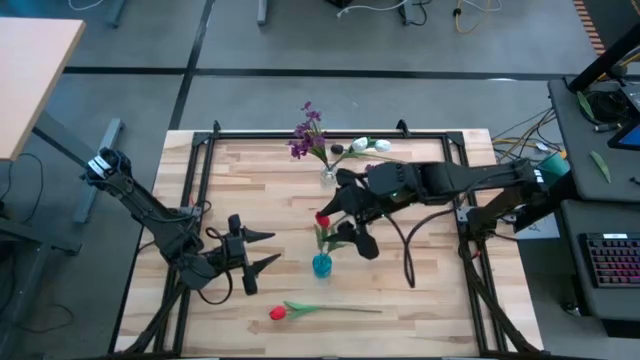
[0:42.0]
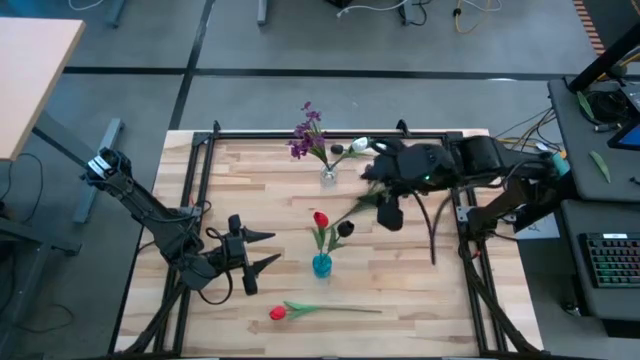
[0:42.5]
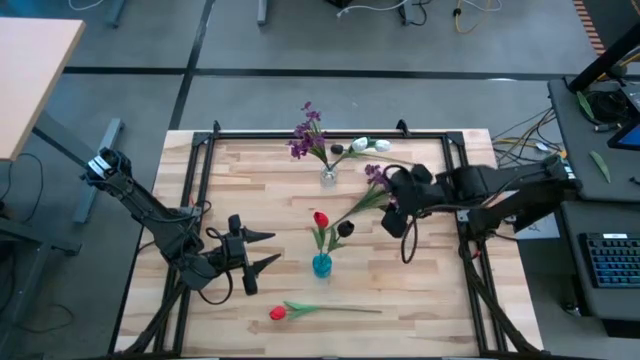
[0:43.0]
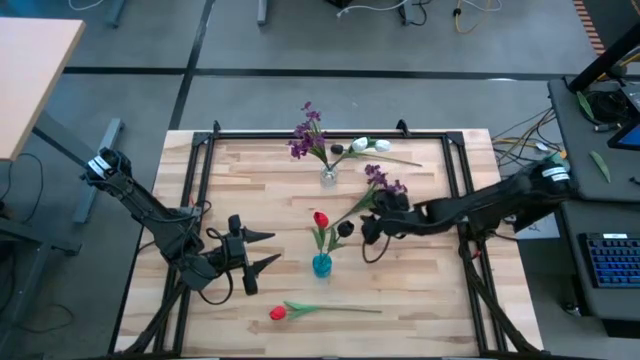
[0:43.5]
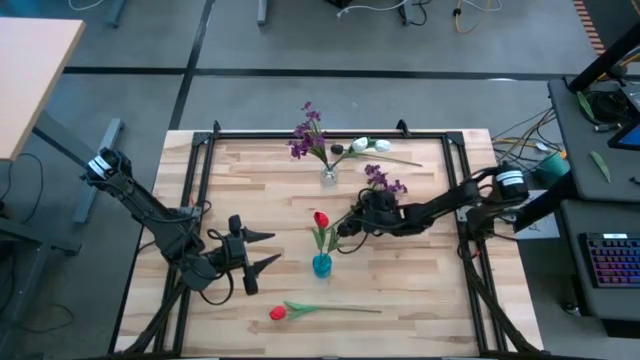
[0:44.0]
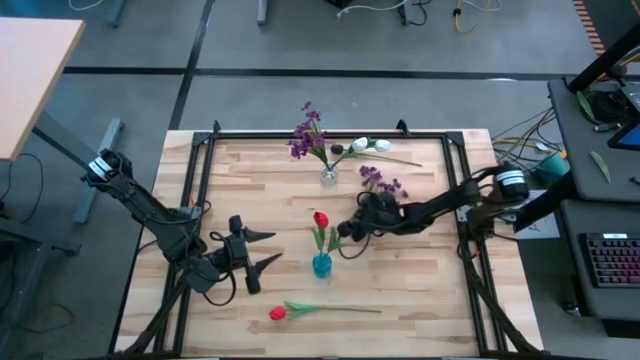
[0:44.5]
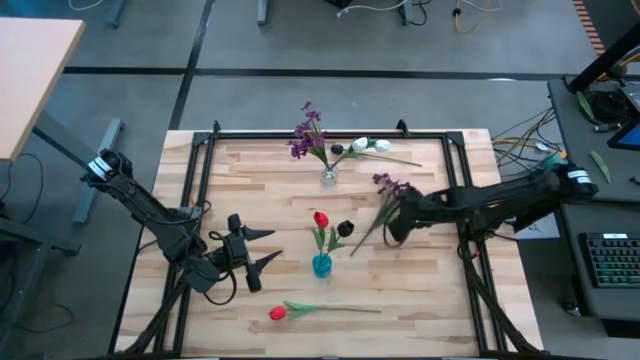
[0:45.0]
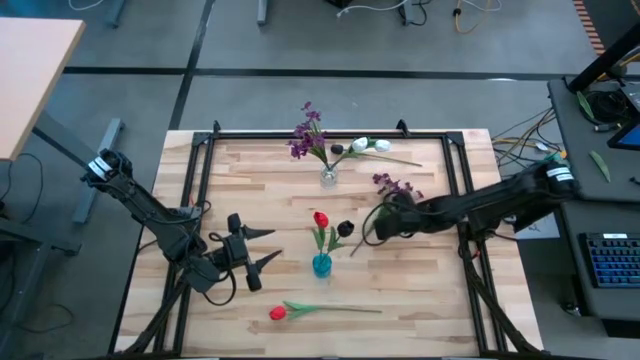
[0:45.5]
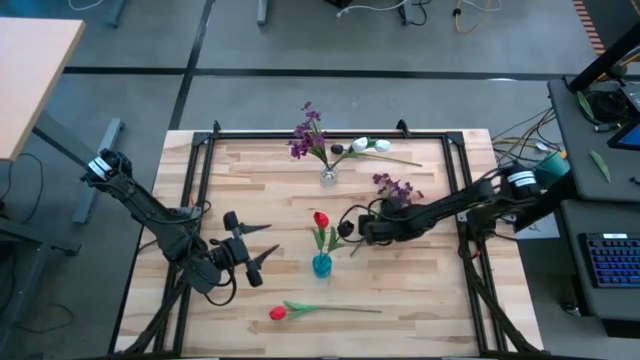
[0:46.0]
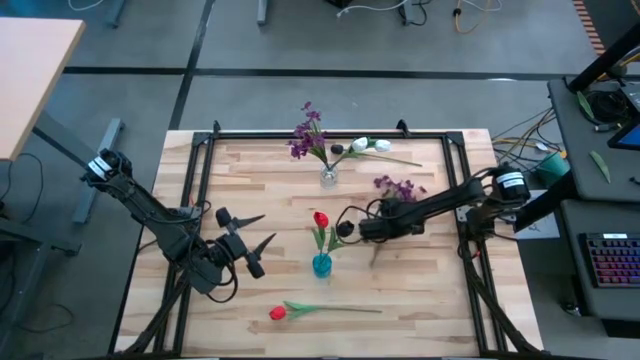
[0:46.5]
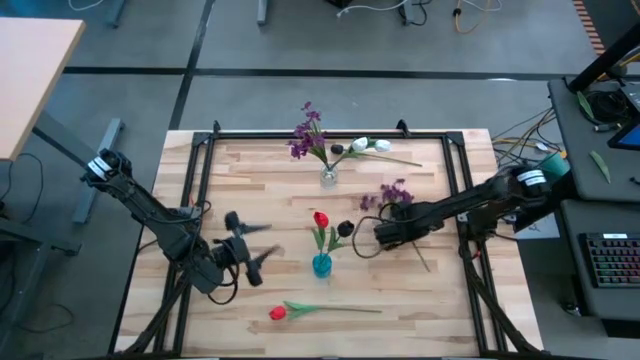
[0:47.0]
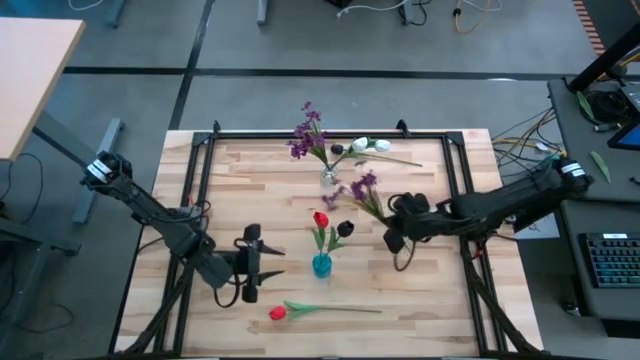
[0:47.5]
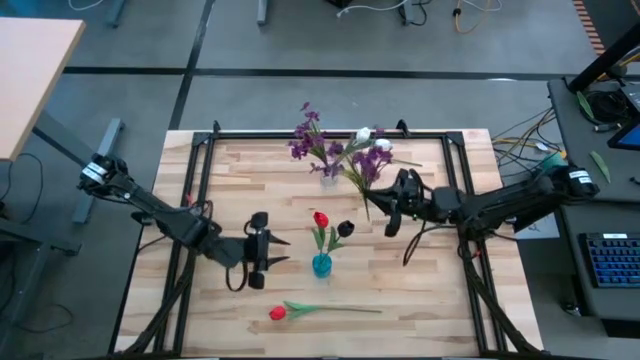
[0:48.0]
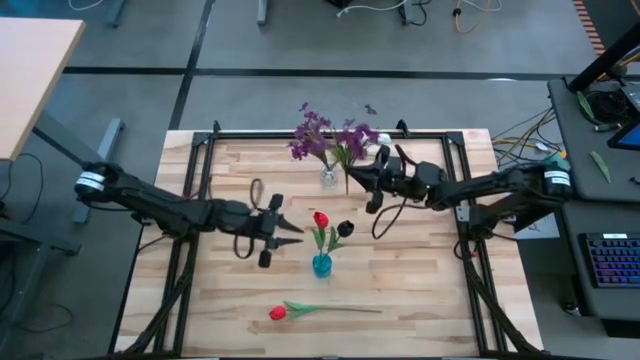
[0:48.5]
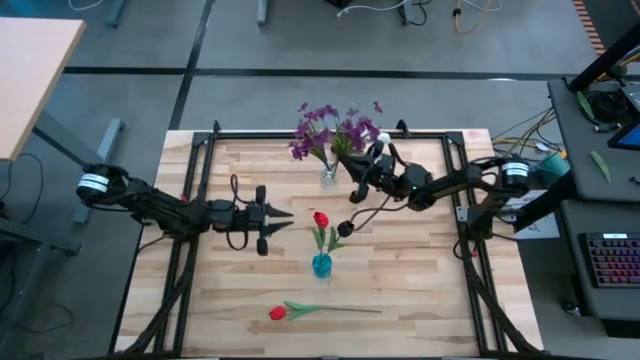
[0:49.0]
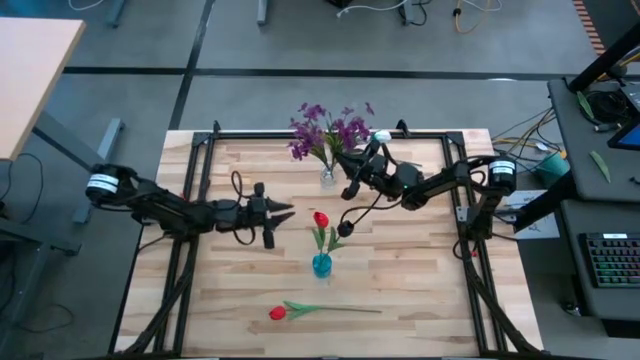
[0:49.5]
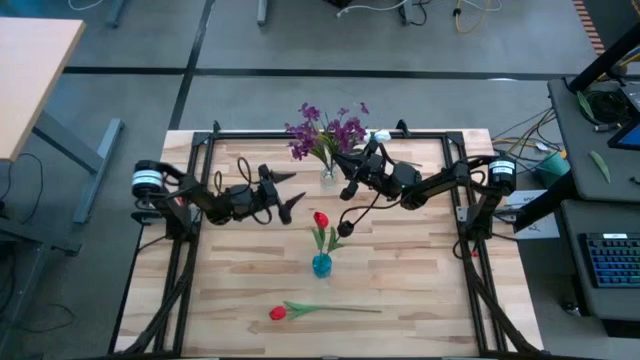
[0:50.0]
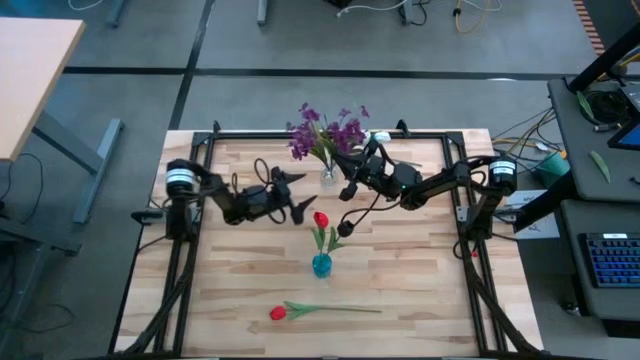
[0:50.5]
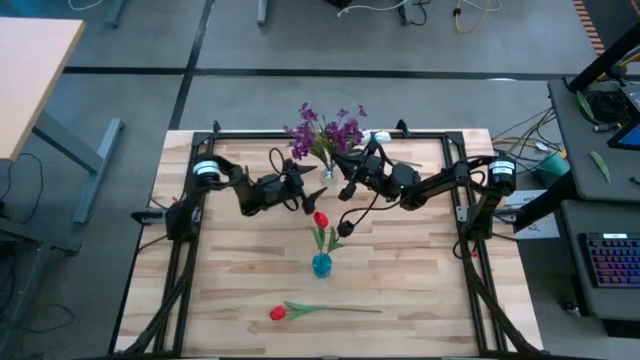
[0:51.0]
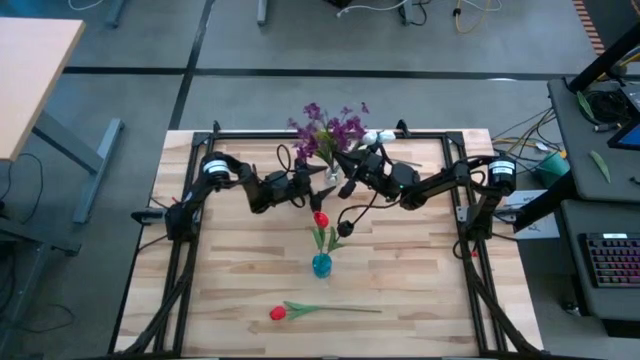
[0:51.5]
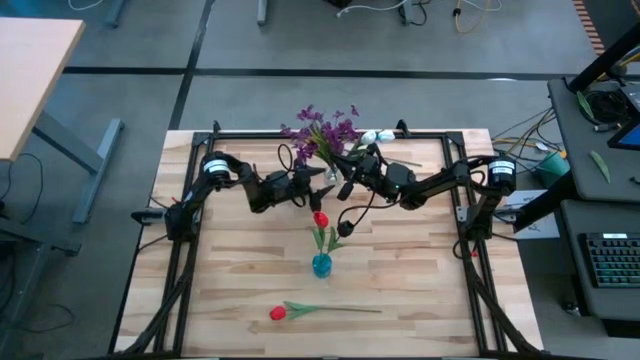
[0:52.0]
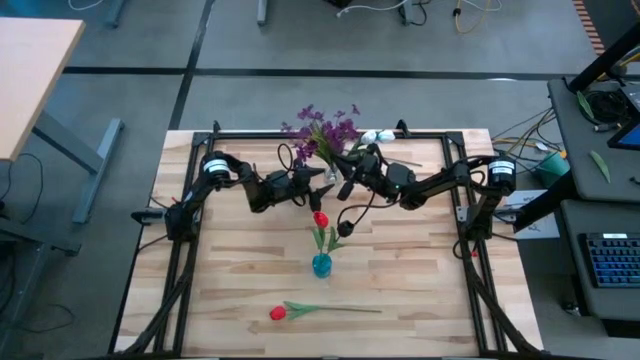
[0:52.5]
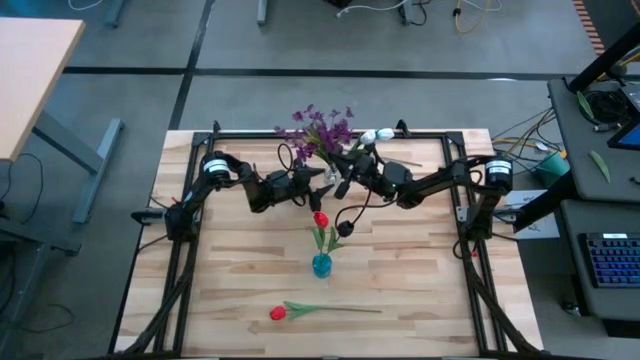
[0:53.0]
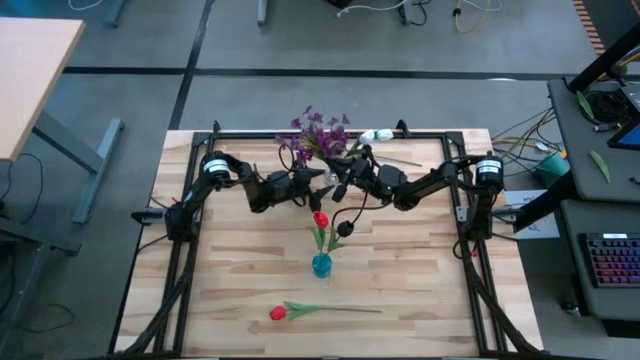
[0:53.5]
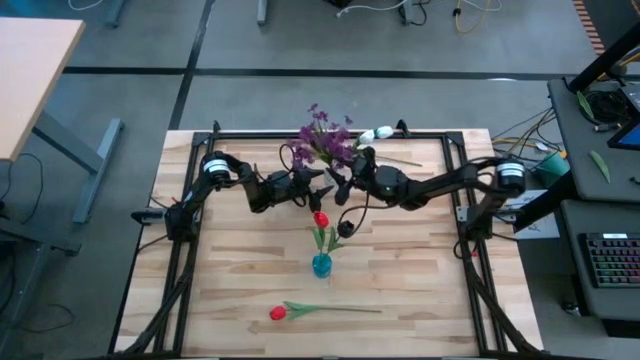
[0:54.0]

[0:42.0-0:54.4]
Task: Sort flowers into vase by color
Put the violet flowers into the transparent vase

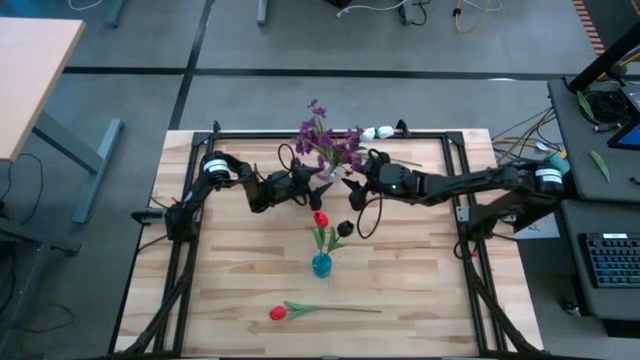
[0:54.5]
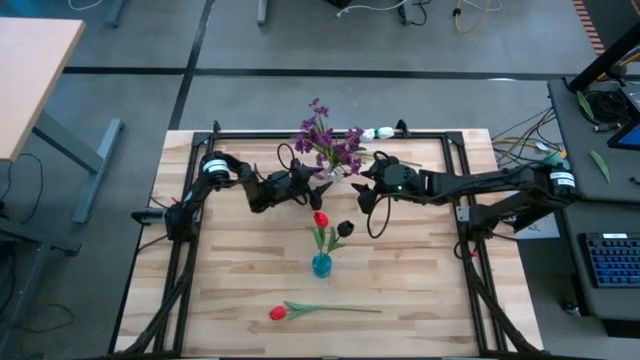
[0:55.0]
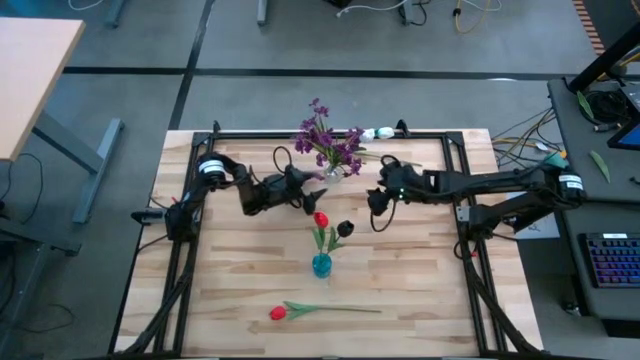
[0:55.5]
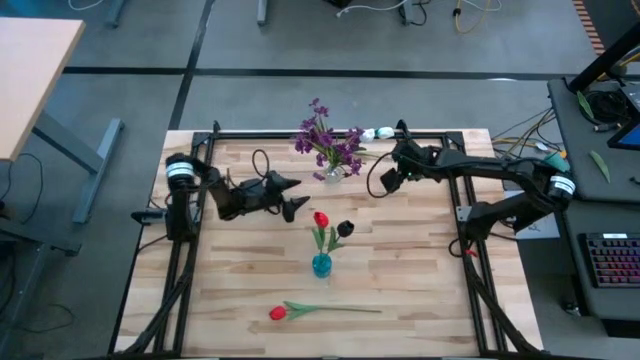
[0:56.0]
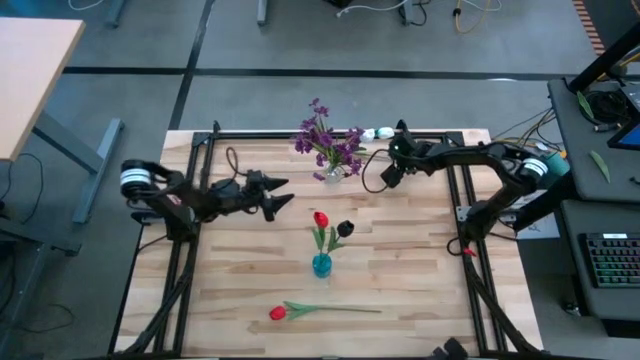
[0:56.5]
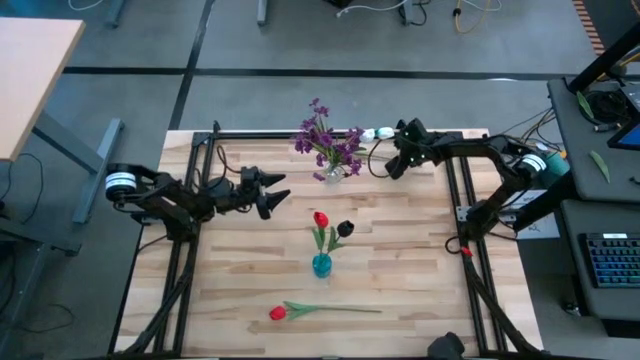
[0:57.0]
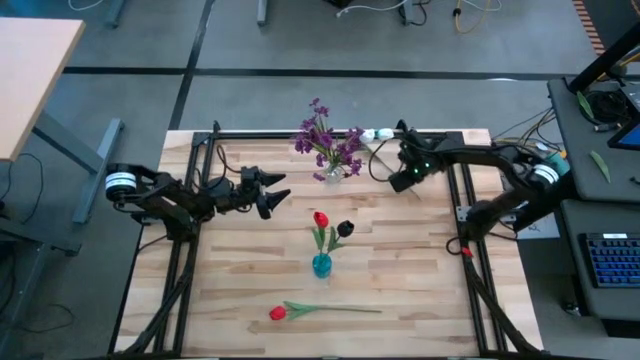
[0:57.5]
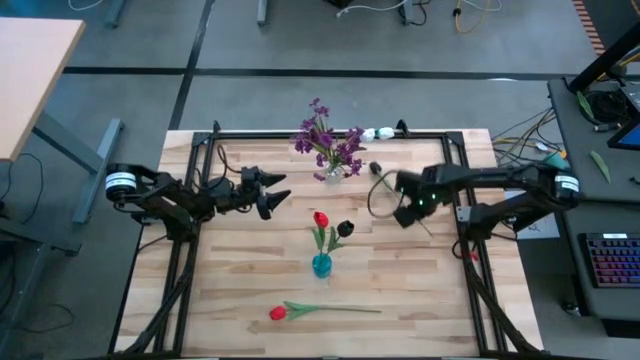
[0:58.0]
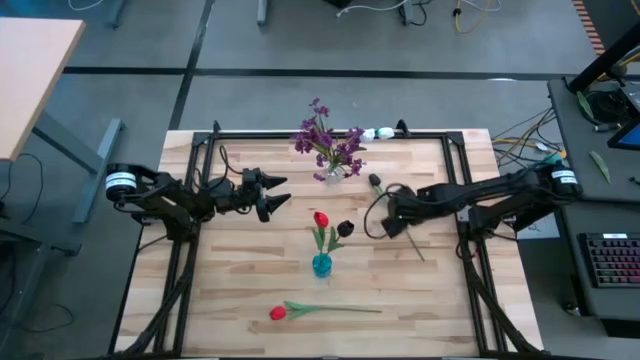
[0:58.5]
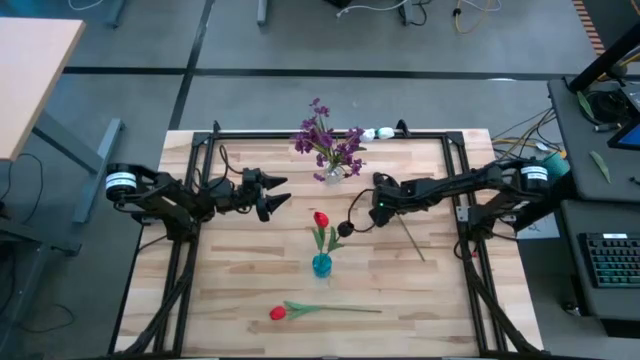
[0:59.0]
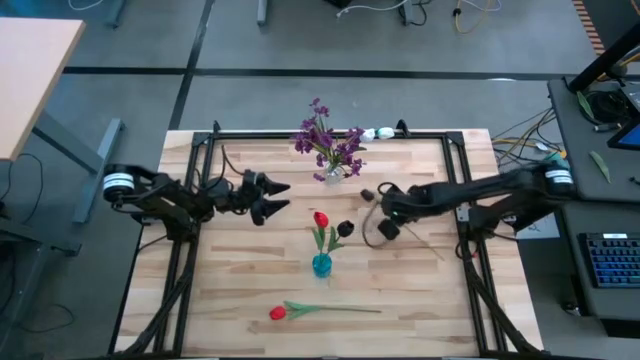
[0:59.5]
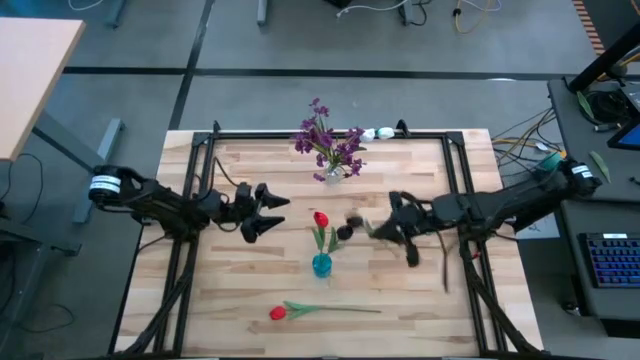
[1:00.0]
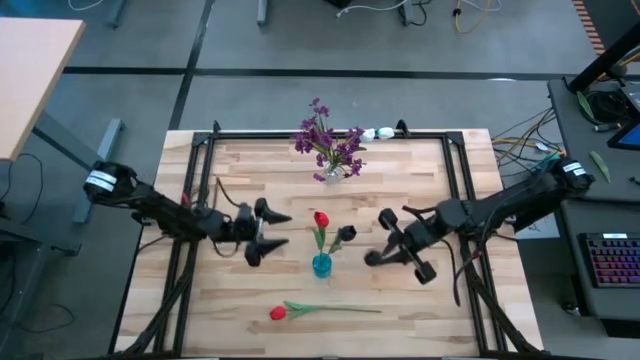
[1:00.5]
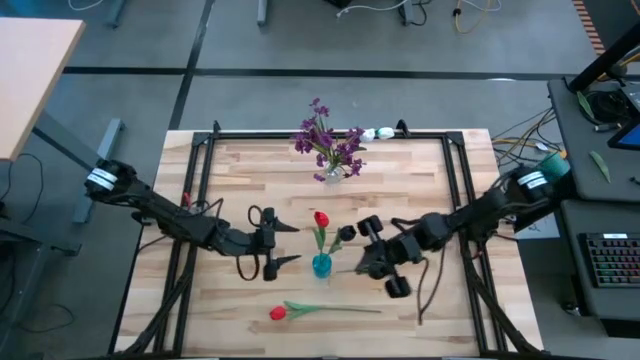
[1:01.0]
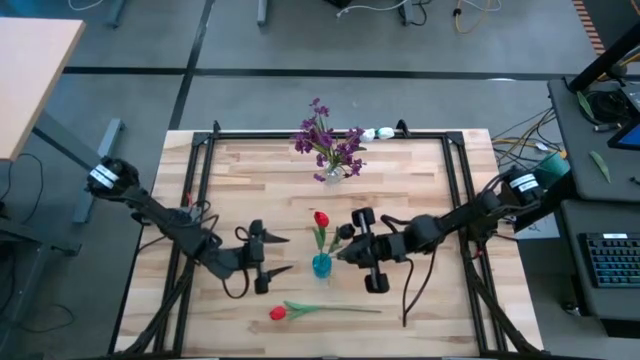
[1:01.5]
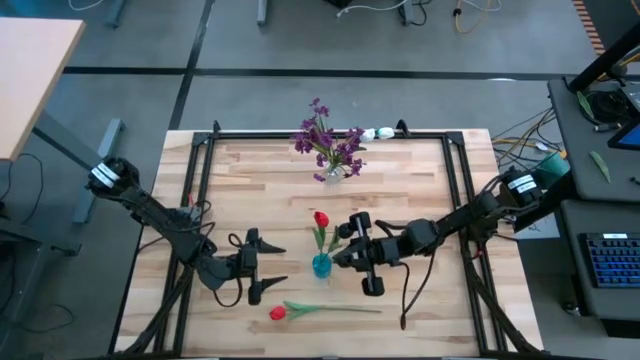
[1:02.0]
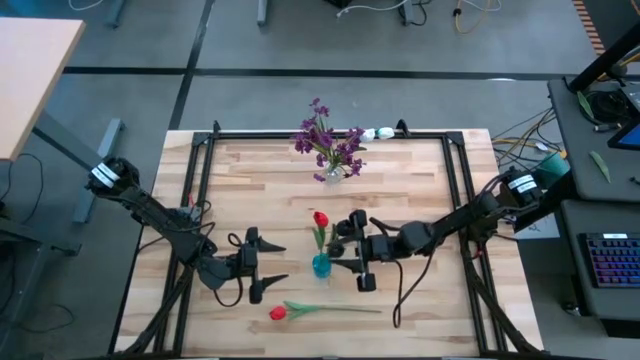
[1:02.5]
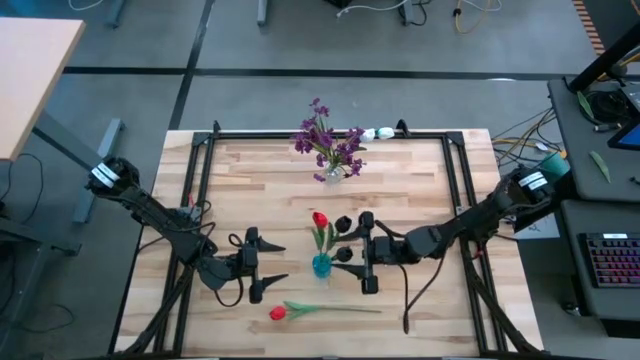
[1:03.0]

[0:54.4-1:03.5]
Put the black flower into the blue vase
